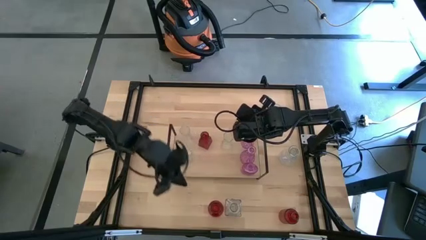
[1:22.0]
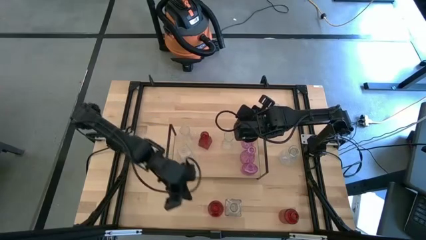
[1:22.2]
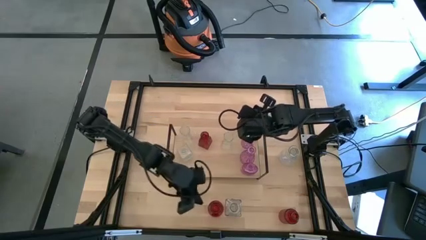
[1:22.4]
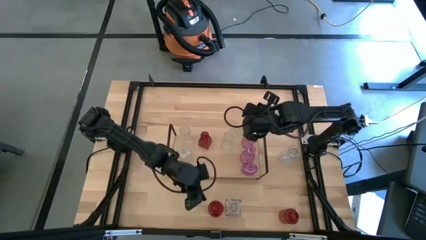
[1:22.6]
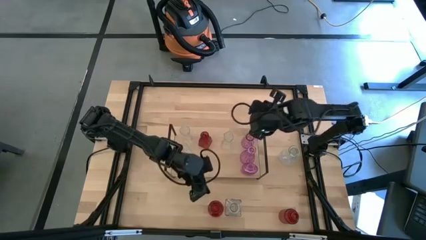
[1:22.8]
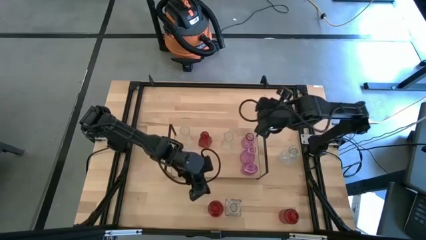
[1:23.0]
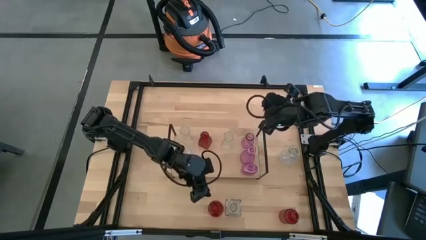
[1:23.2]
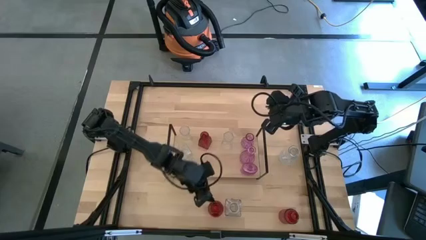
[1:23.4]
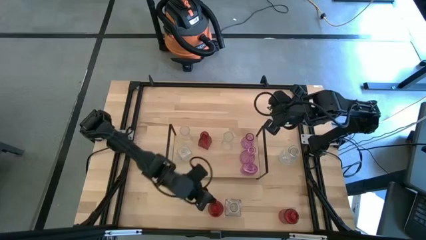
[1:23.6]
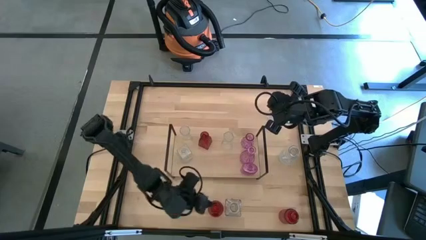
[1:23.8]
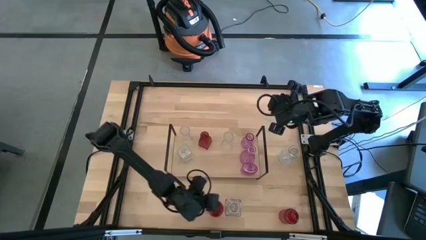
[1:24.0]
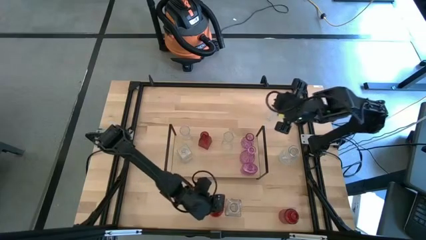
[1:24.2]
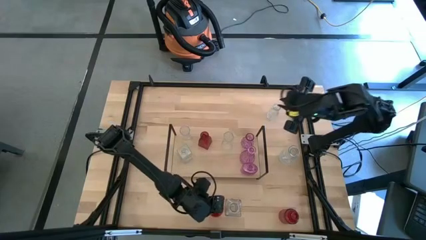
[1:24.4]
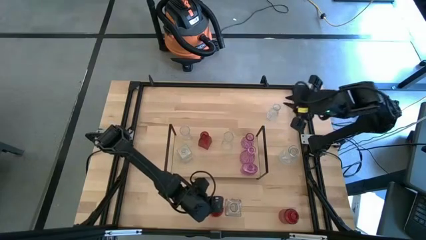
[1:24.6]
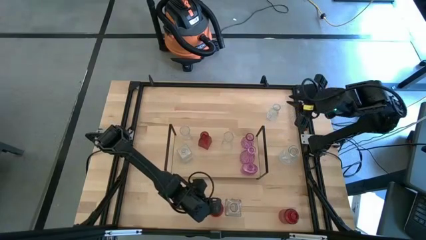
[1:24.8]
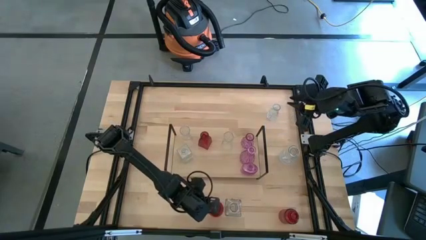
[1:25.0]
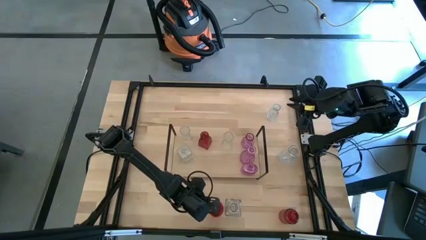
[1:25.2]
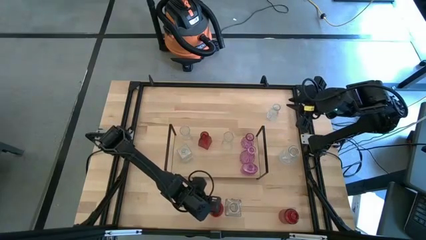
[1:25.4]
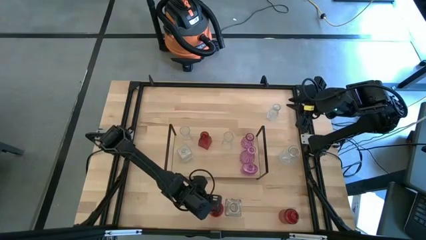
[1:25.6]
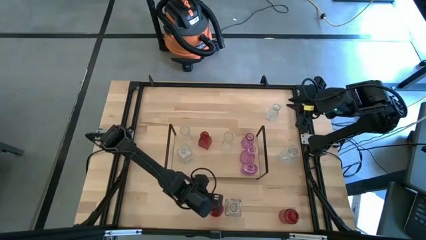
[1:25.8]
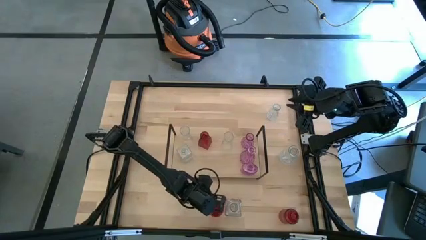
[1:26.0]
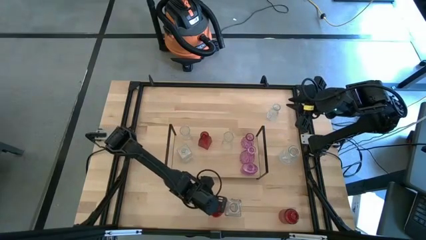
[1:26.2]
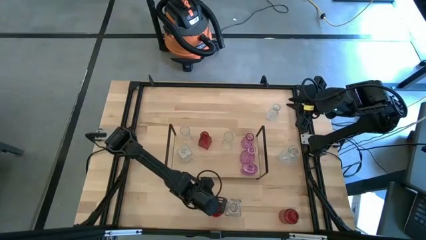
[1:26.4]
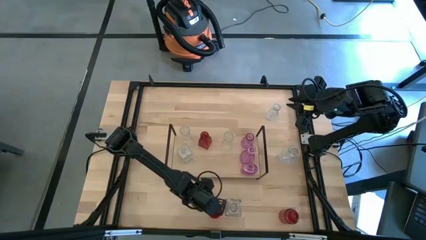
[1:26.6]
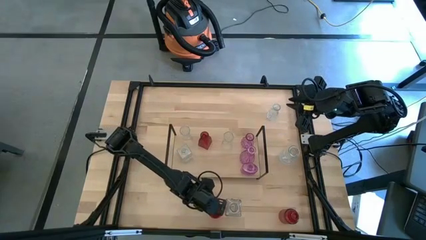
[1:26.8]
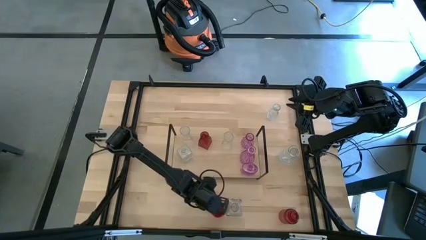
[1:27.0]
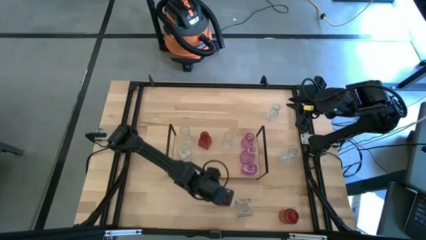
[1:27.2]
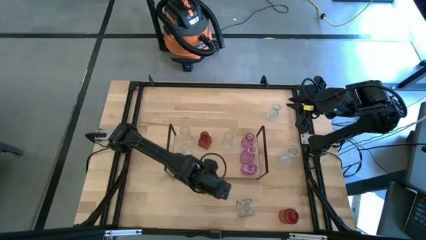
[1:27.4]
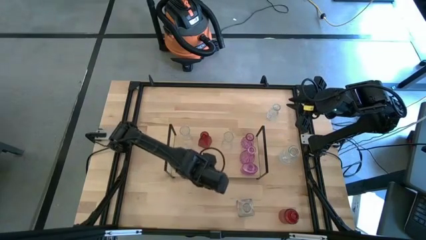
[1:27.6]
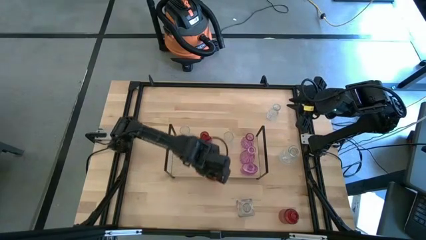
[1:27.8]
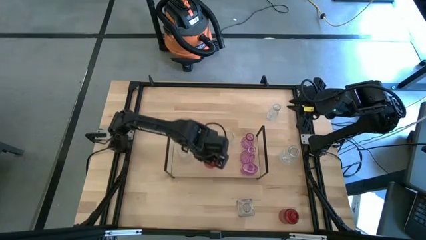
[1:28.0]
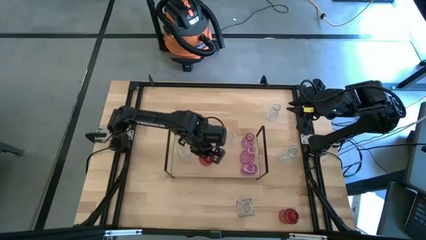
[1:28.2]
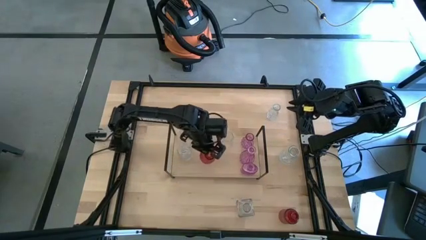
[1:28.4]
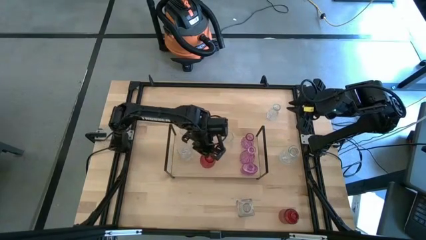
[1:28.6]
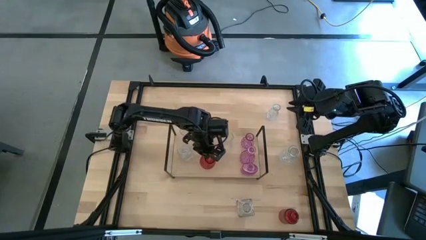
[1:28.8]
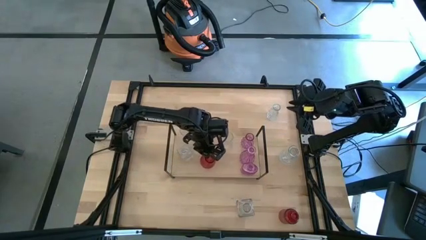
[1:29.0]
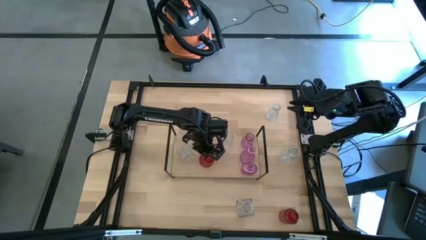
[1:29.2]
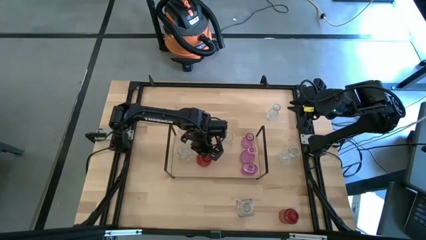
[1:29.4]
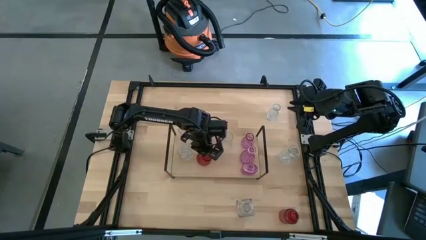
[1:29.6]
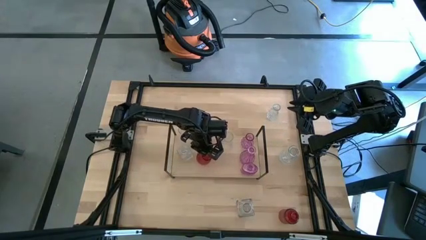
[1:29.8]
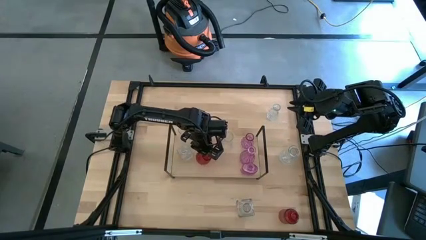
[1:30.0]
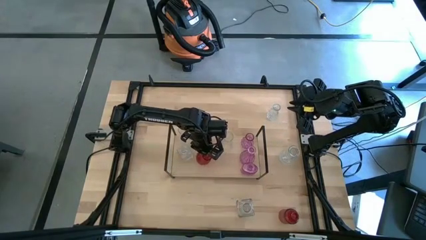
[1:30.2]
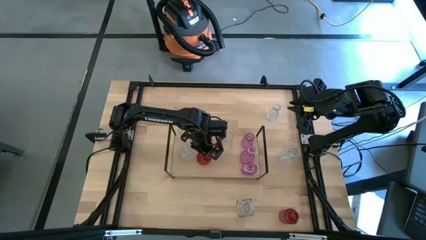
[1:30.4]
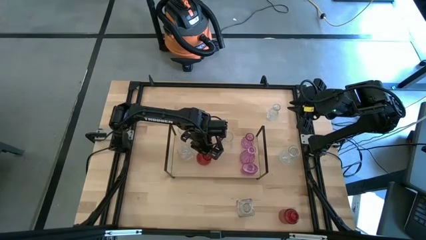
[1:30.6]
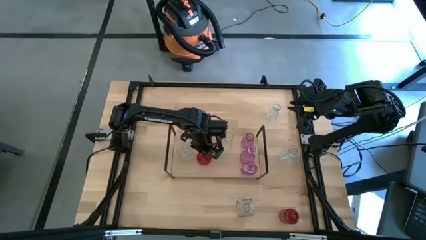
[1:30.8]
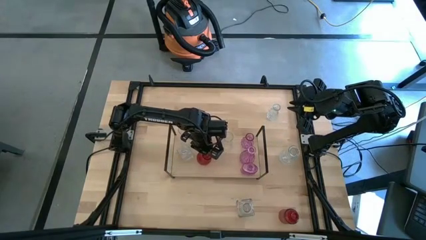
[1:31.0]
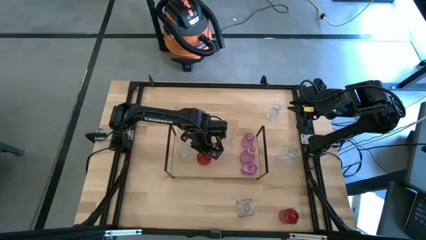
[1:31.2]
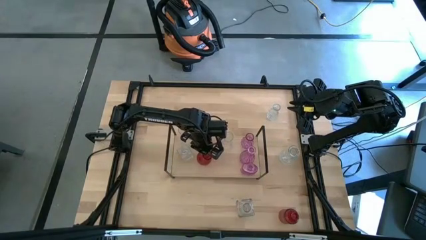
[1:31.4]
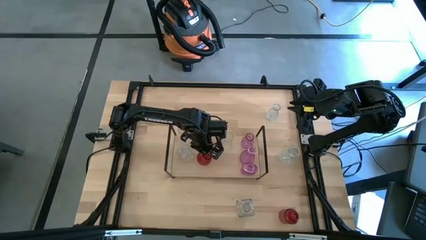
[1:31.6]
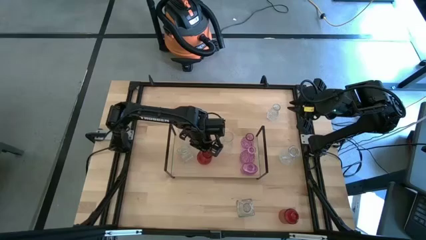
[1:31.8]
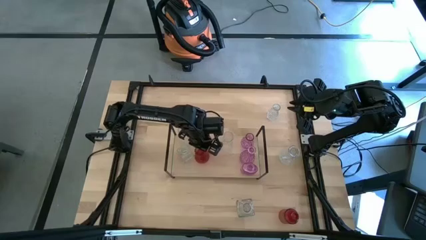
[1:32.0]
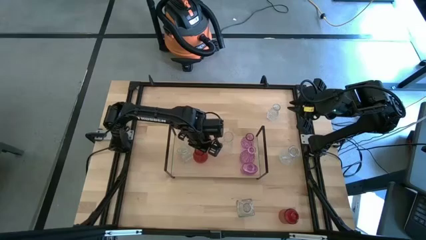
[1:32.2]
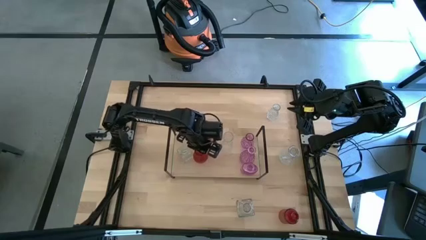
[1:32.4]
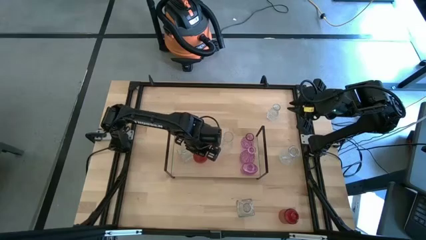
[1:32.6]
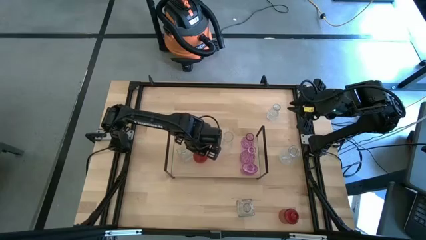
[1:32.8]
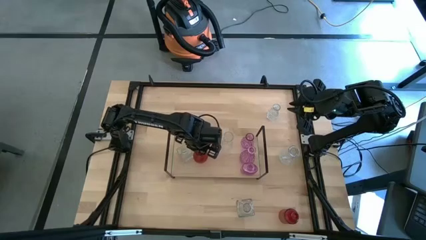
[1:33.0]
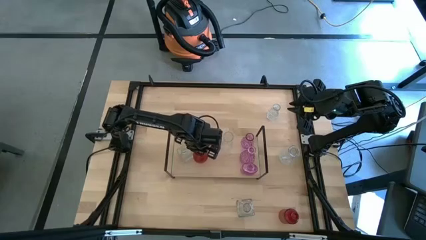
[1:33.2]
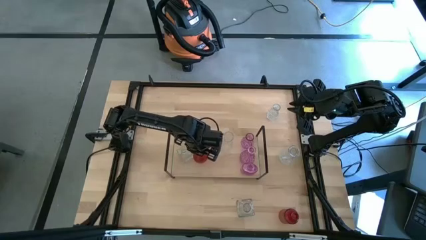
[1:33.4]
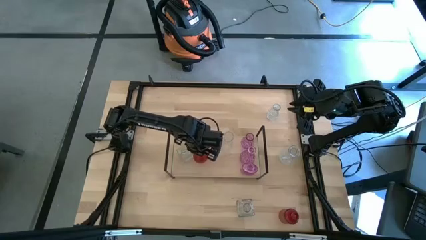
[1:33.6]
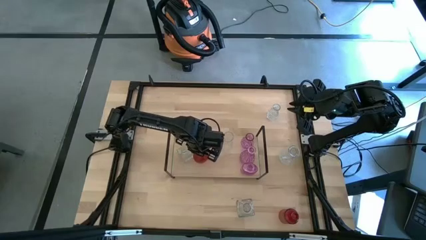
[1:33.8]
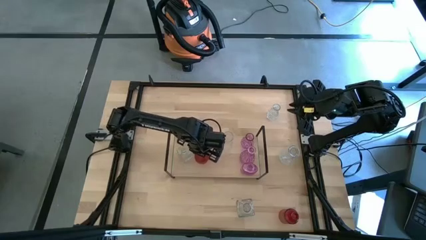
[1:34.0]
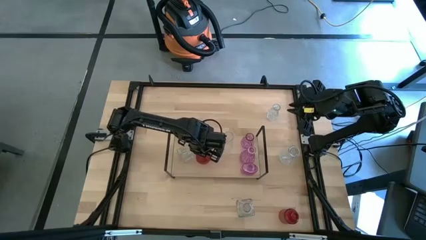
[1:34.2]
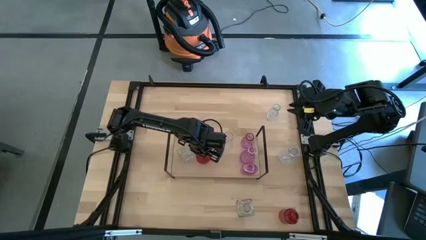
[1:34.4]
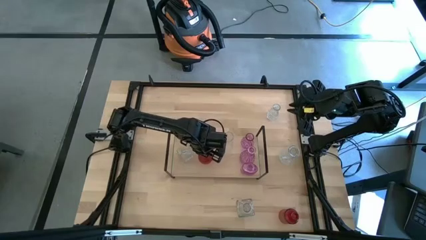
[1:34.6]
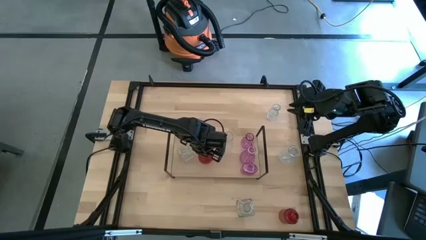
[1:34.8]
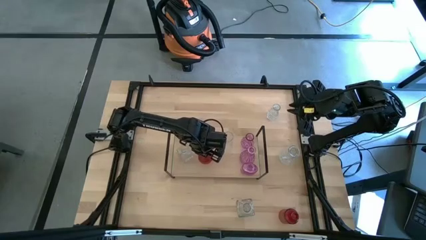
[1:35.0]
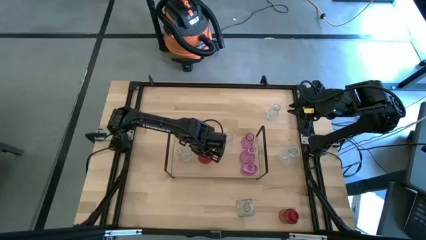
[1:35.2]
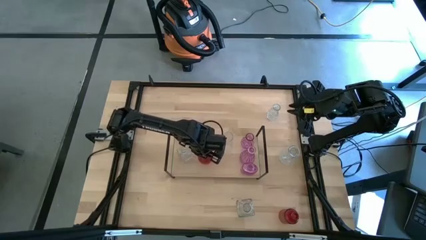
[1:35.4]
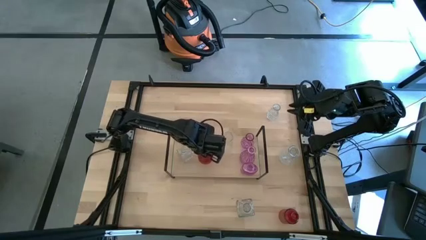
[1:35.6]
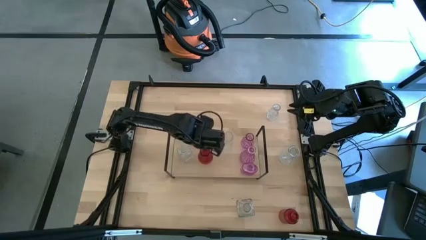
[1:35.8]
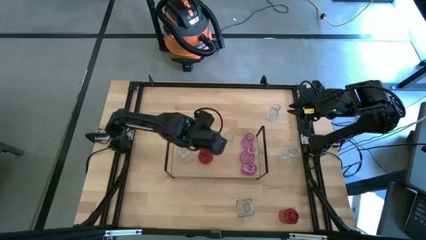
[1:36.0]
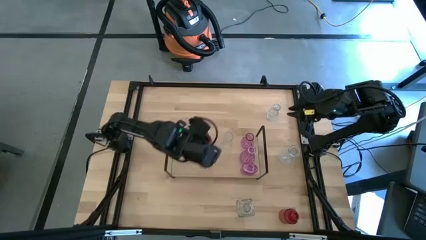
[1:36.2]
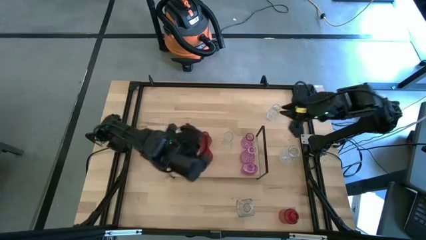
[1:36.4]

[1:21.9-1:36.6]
Task: sort vases onto shelf
Put the left red flower vase on the shelf aligned with the other red flower vase
